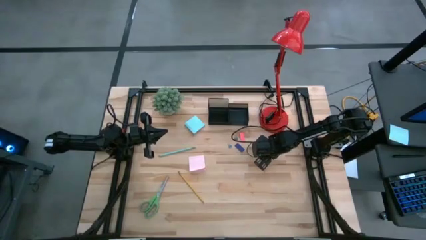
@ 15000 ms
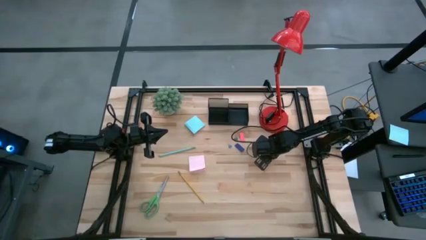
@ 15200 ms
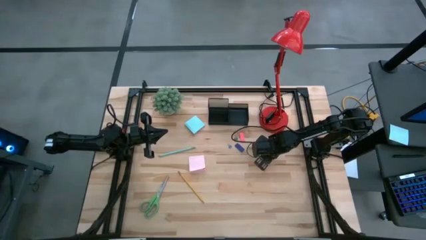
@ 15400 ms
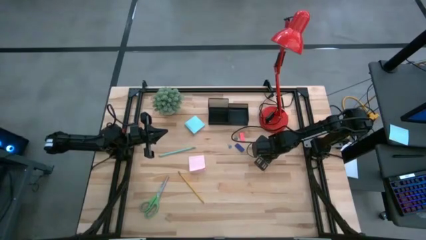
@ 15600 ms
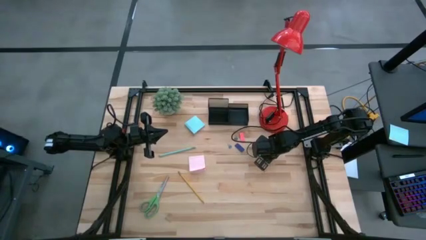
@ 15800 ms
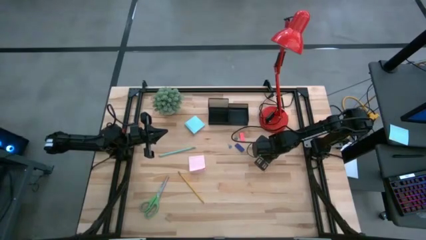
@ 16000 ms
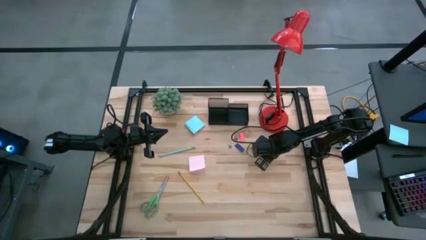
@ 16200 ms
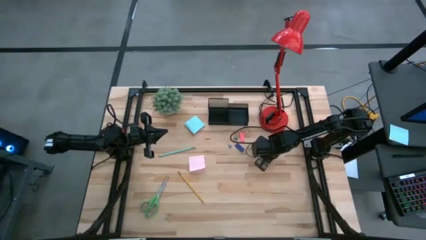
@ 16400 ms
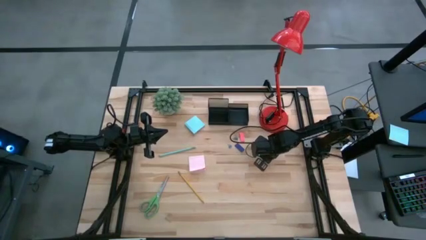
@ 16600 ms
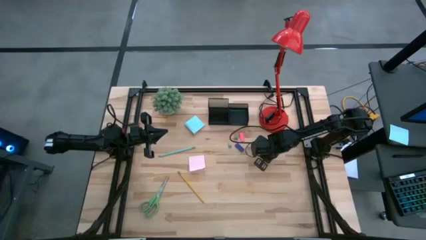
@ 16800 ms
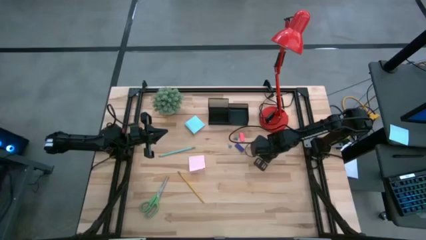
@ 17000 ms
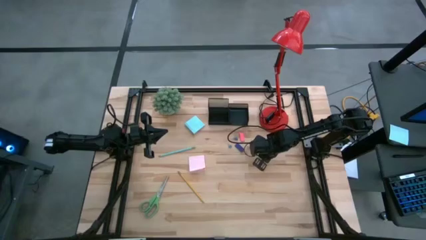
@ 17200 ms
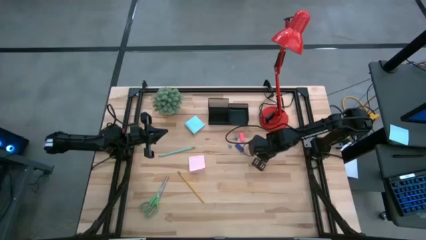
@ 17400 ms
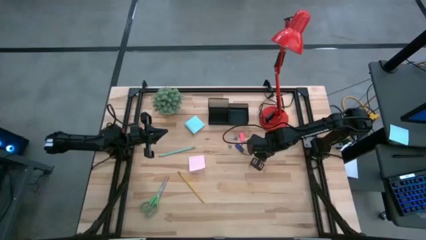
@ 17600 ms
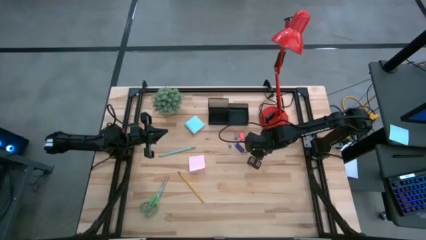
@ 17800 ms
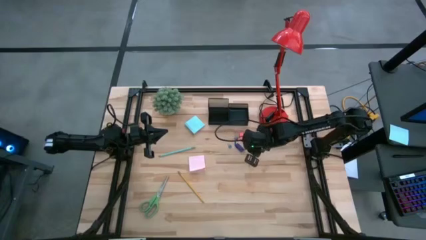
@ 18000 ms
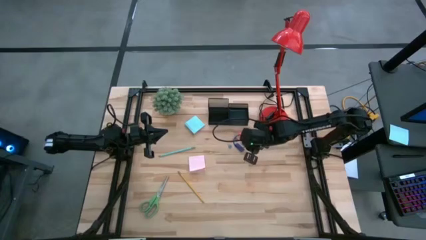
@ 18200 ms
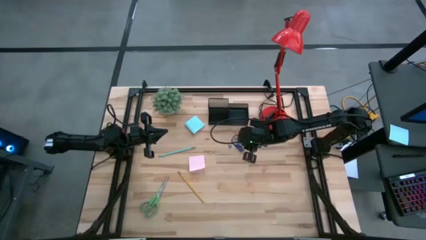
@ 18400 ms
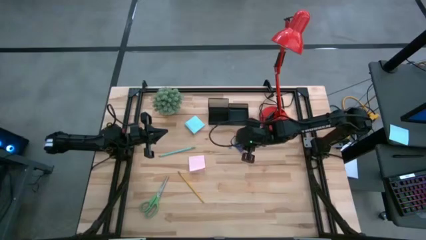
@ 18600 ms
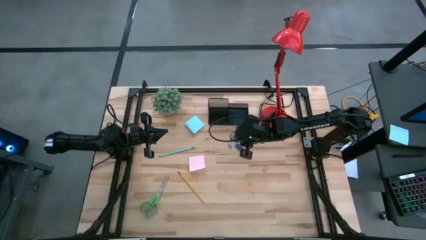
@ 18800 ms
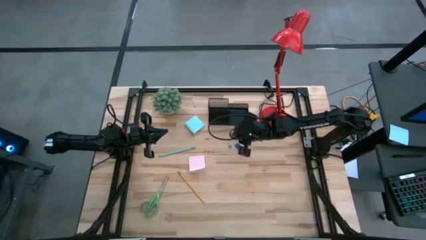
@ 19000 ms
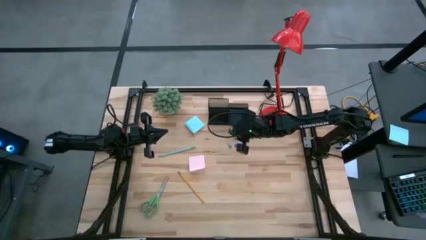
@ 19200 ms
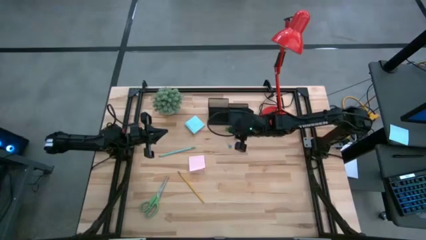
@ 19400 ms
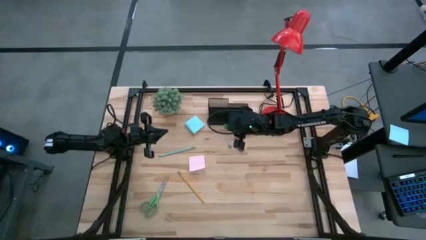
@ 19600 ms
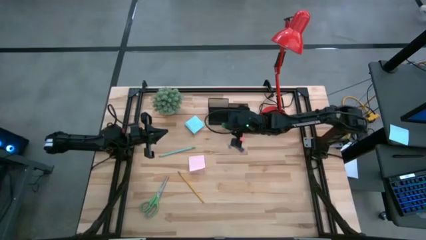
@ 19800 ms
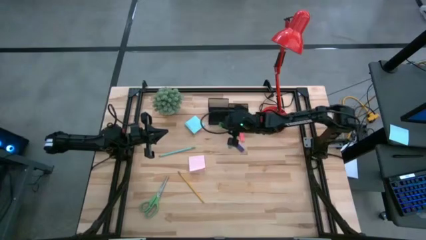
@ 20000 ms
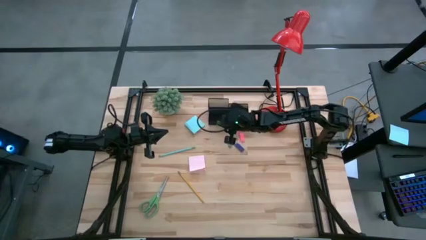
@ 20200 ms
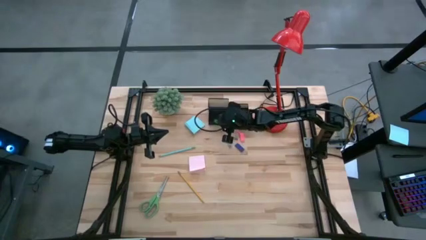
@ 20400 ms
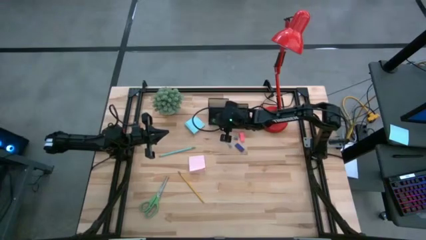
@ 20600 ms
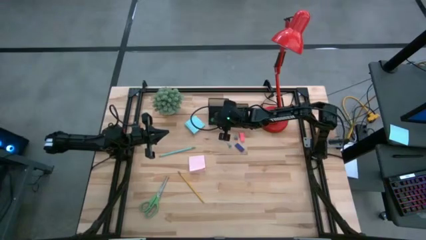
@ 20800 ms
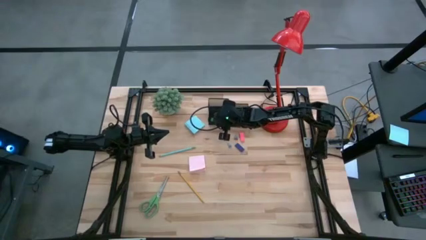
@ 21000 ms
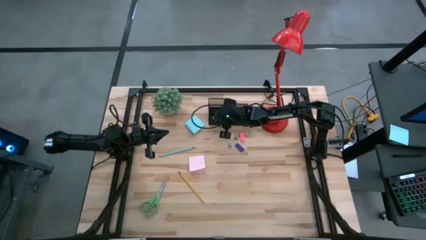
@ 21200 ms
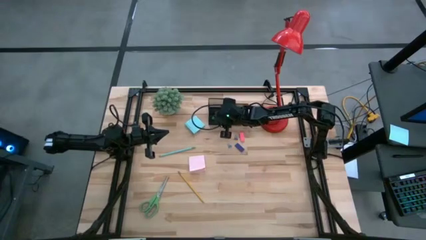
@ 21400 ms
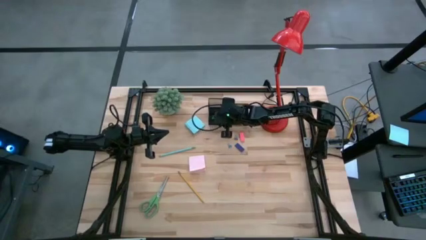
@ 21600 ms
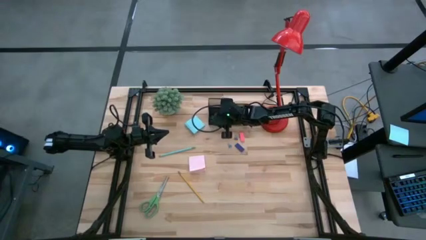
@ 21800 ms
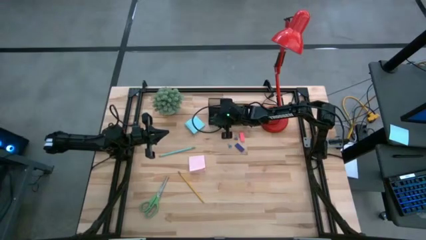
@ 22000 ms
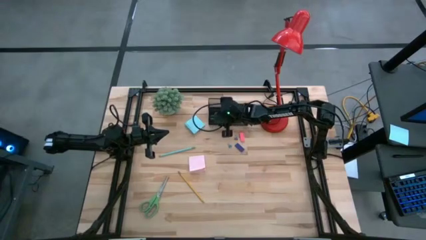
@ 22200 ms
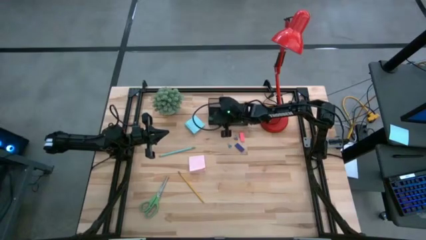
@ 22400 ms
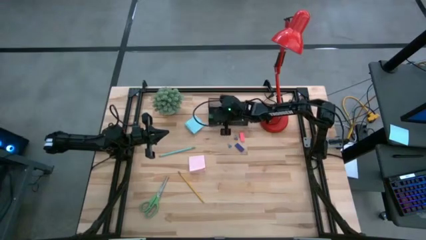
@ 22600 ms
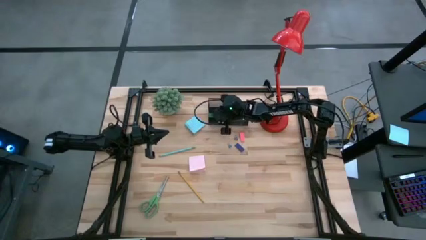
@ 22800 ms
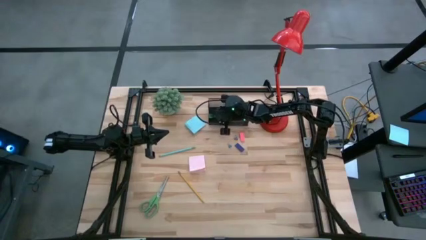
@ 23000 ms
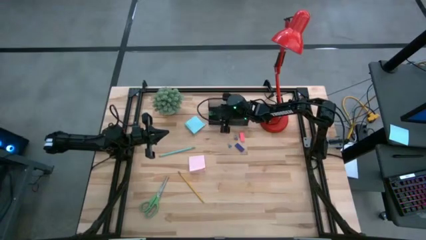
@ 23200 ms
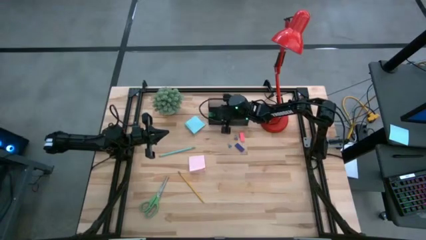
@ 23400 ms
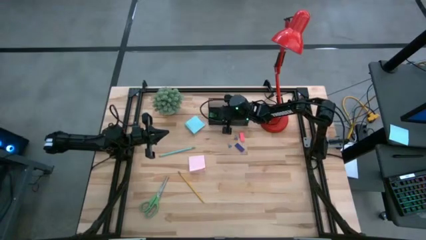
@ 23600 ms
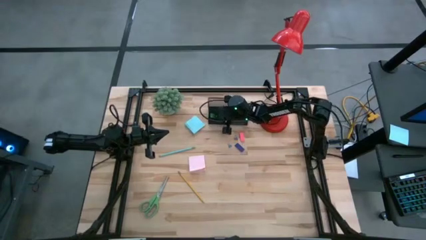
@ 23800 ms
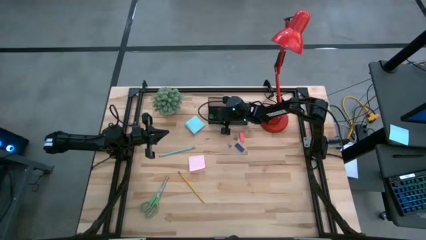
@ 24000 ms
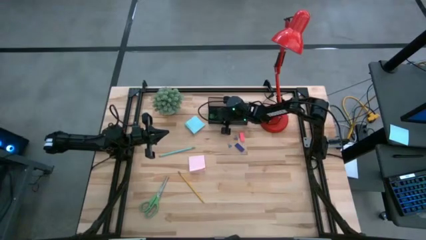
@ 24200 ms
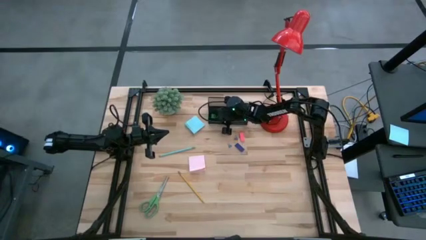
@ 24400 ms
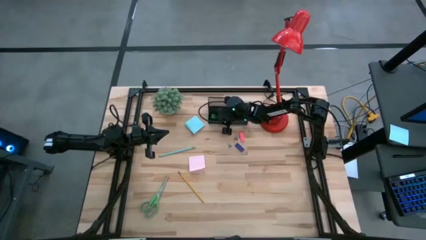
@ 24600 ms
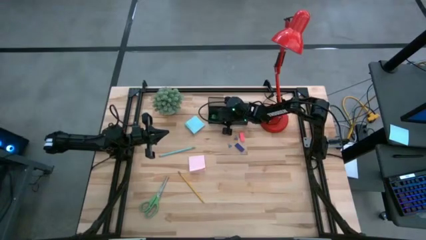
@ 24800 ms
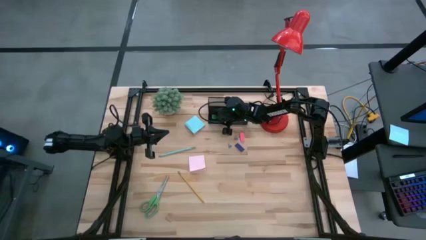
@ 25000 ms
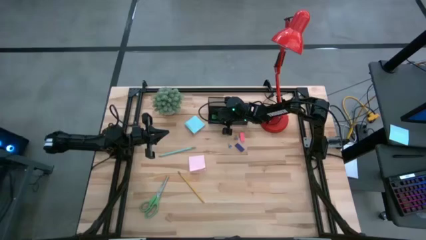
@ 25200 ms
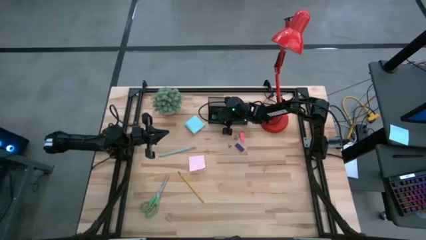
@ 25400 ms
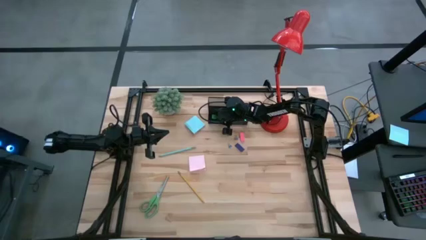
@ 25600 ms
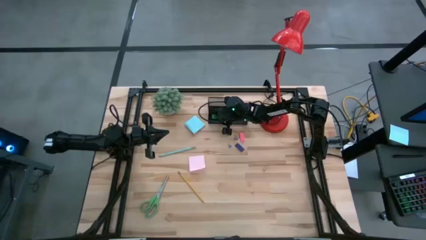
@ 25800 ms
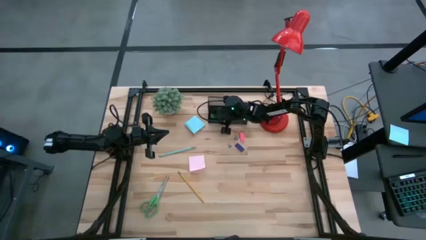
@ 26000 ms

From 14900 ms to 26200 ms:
Task: Pick and place office supplies into organizer
Put the green eraser into the desk organizer
